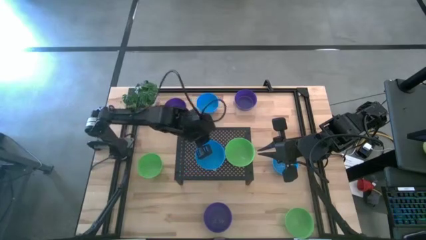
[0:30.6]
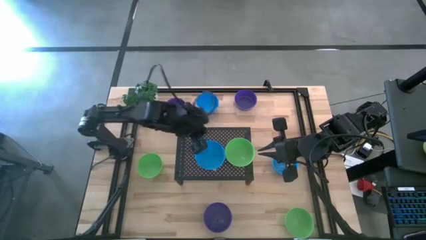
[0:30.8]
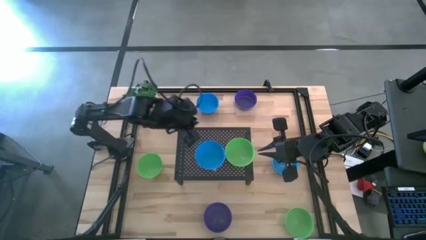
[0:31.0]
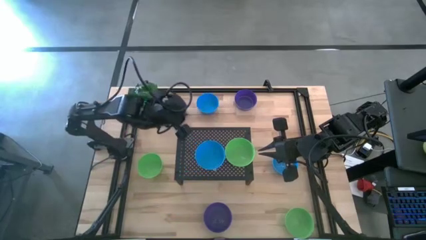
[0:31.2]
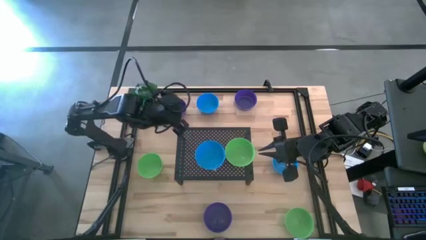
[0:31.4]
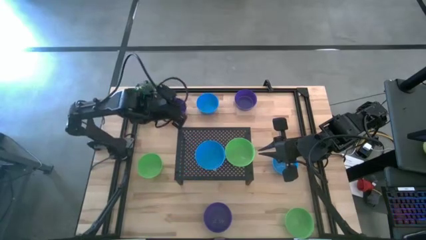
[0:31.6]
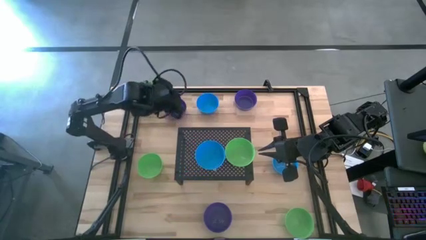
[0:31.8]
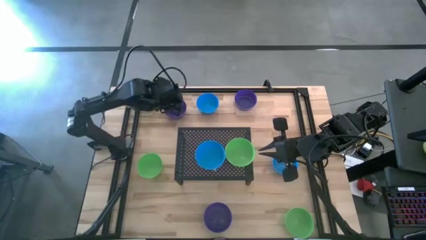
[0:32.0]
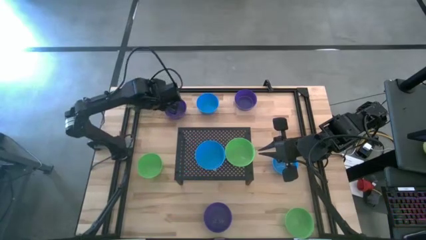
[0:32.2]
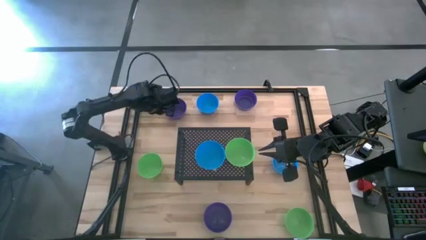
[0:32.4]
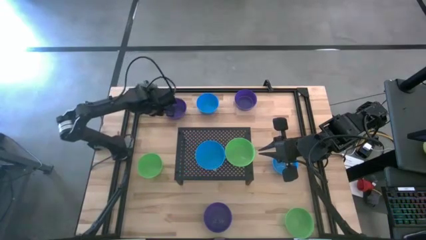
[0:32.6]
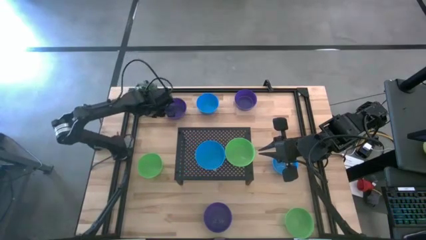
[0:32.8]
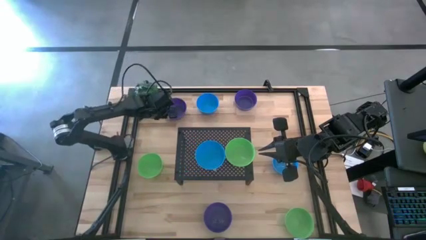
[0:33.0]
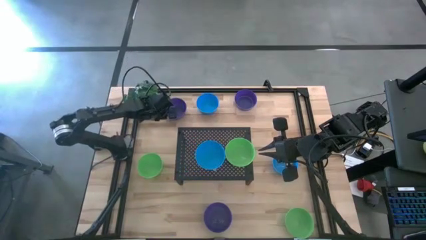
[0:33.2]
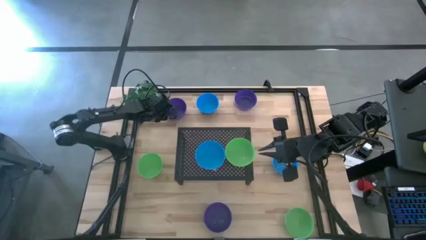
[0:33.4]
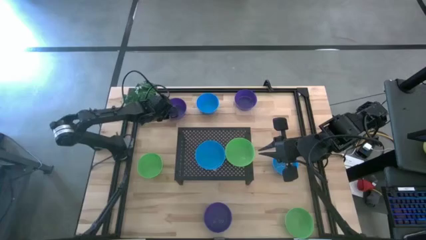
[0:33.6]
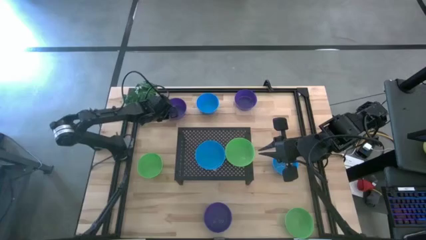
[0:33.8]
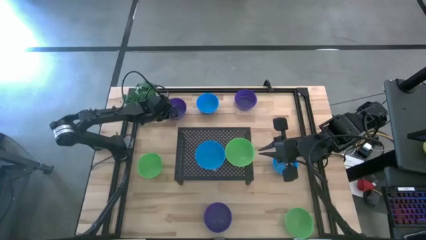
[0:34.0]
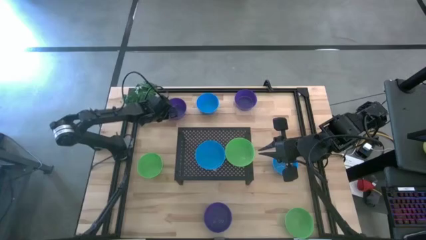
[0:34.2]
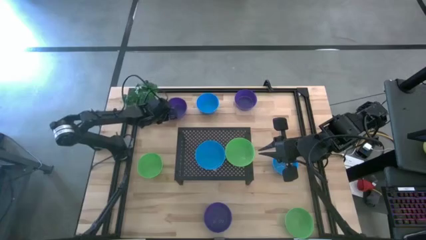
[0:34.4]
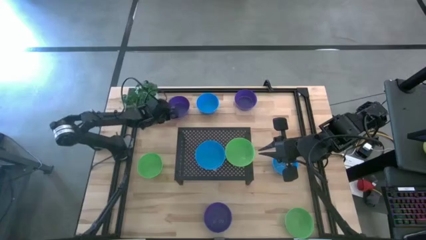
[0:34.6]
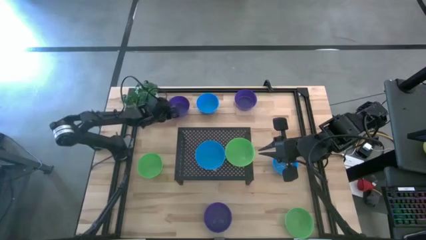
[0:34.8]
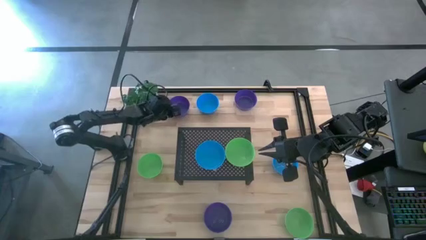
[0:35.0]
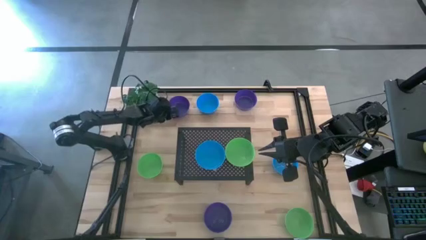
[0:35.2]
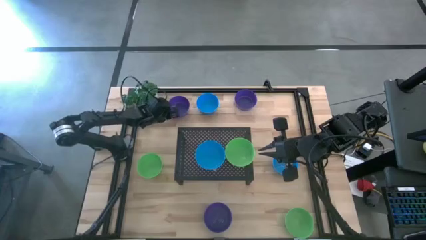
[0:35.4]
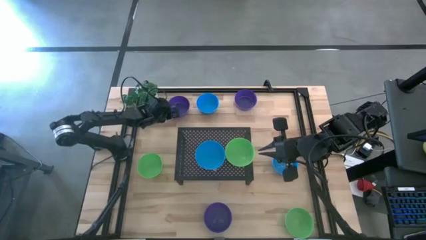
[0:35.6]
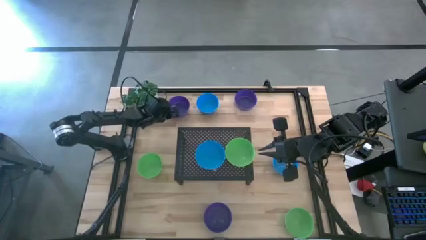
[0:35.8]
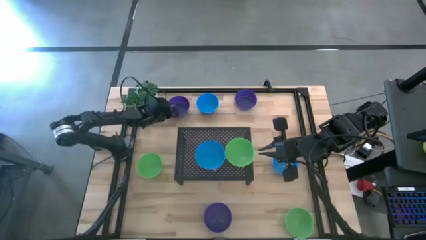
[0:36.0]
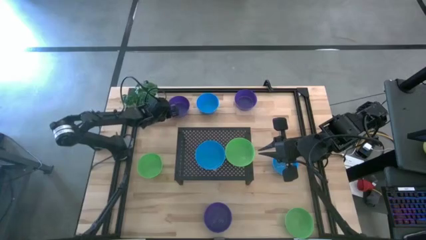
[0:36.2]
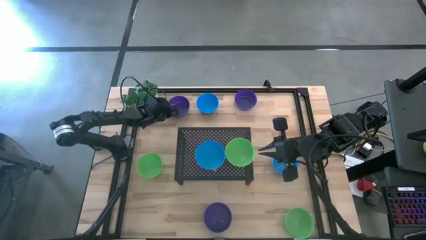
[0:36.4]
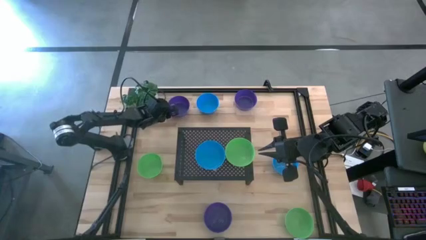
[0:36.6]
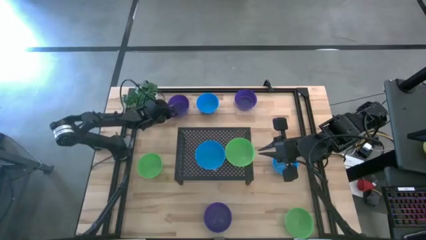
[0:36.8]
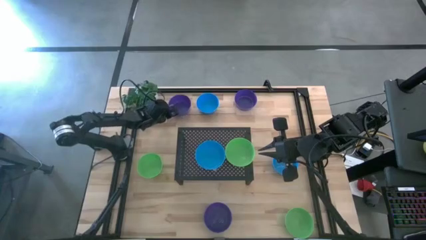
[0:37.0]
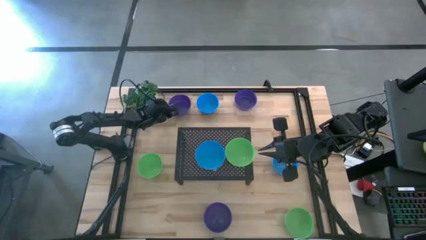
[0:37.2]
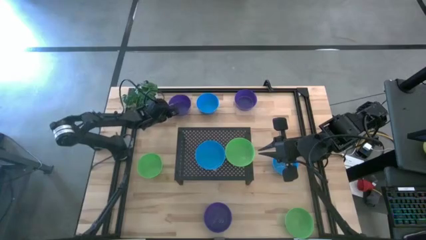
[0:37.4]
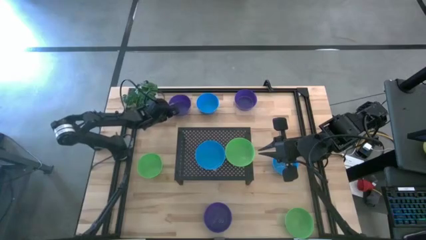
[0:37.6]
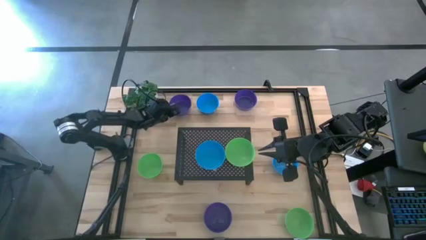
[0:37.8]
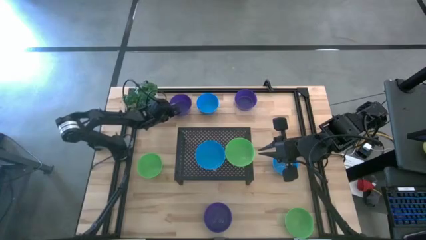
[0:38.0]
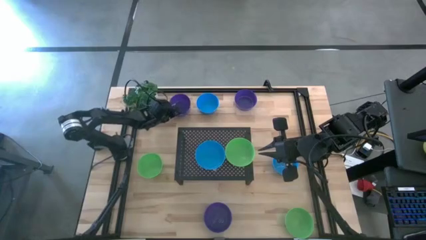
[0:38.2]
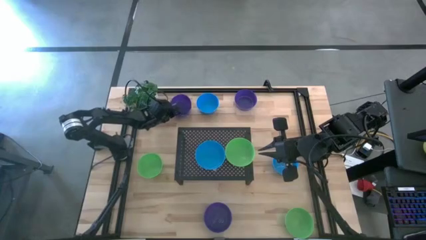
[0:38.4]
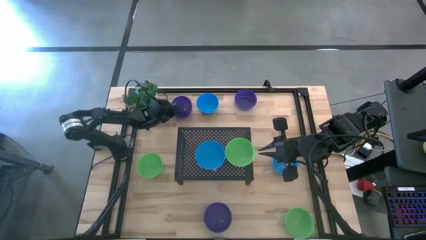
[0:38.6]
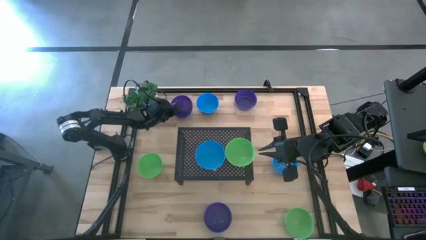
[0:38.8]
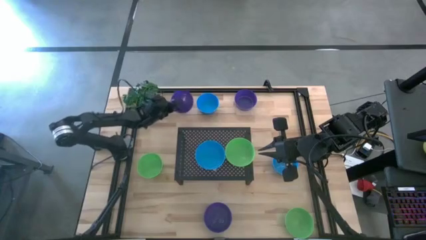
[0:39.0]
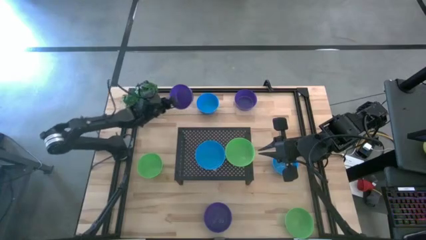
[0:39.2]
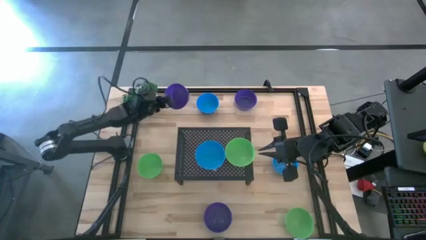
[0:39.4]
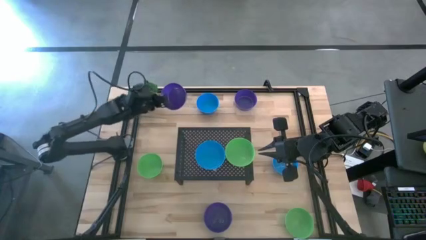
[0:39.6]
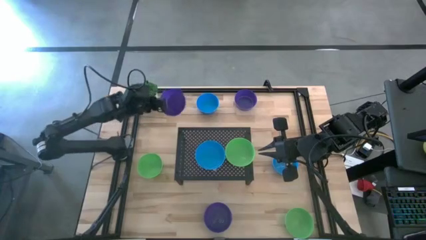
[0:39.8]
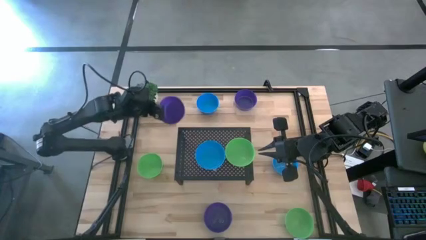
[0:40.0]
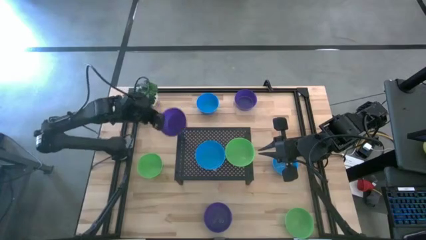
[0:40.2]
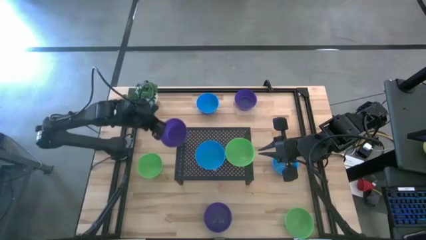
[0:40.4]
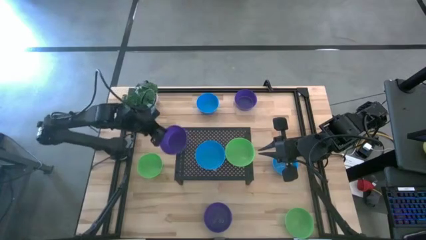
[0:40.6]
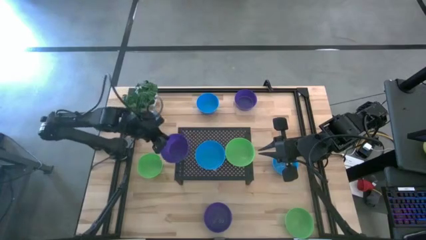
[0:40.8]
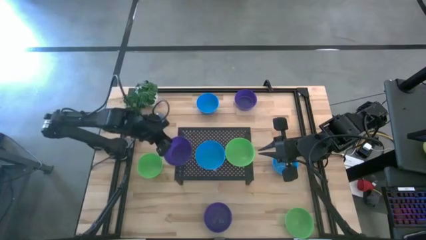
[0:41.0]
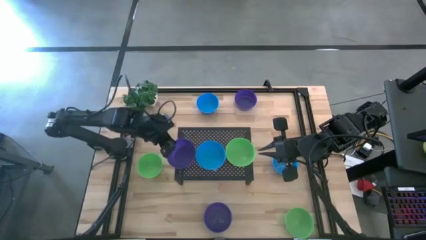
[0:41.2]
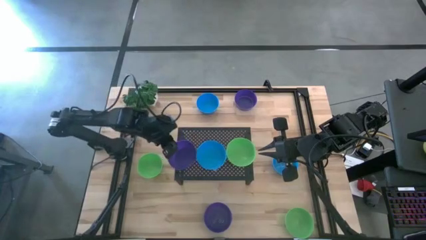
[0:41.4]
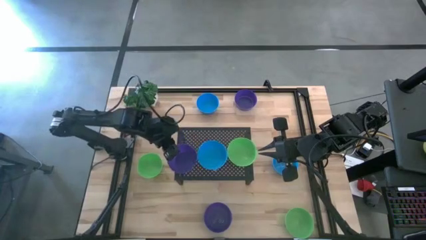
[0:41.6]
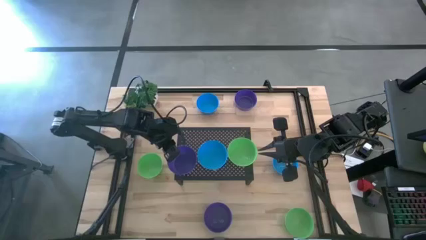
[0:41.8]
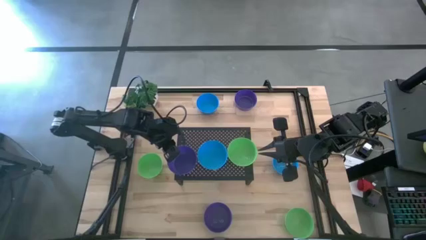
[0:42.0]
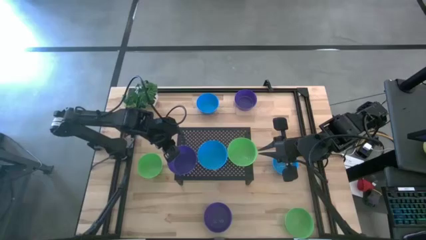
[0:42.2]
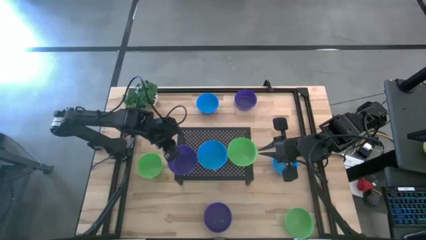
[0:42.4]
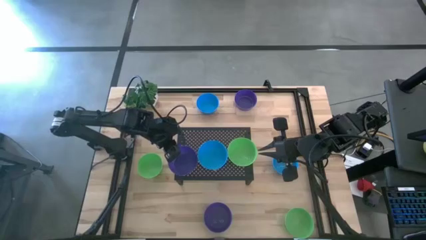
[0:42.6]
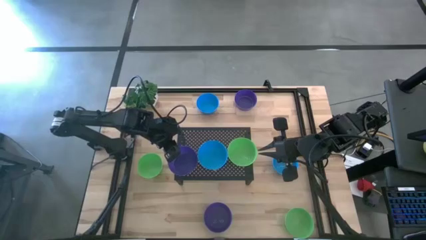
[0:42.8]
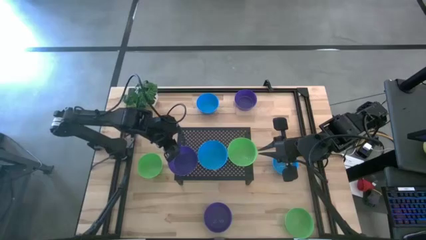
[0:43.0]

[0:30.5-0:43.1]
Task: Pick & Place Mini bowls
Put the top left violet bowl on the shelf
